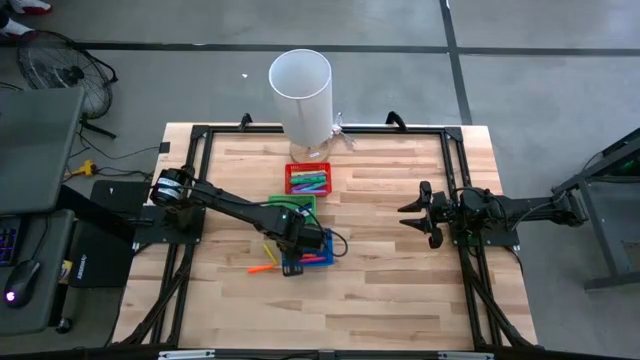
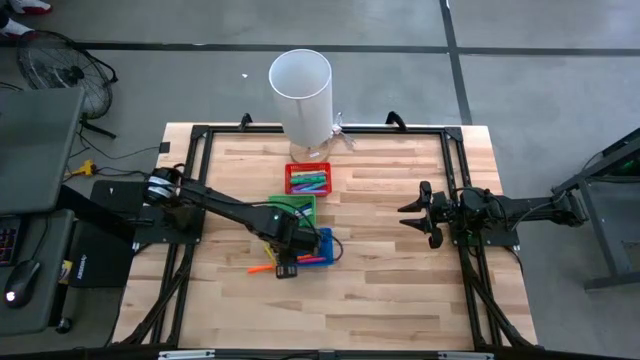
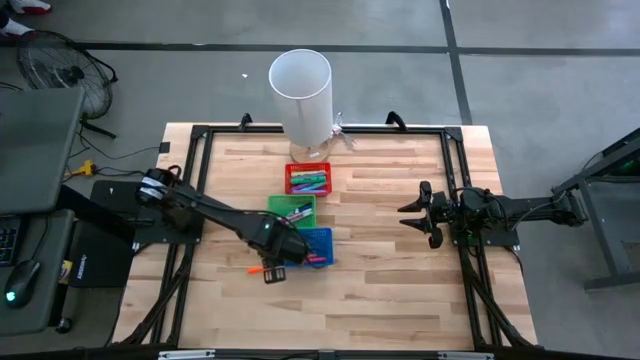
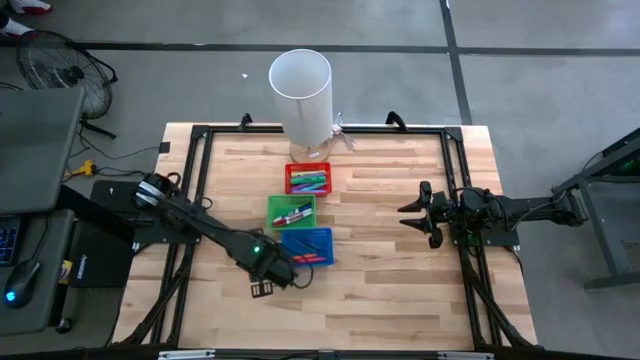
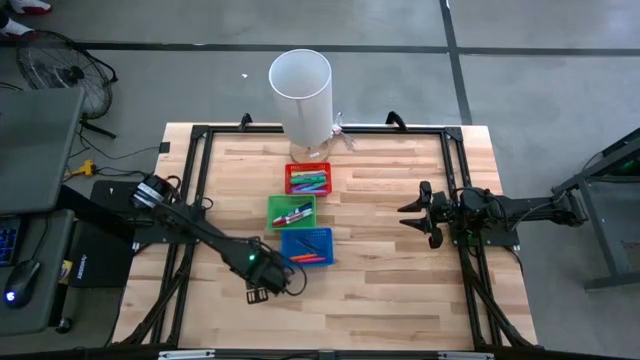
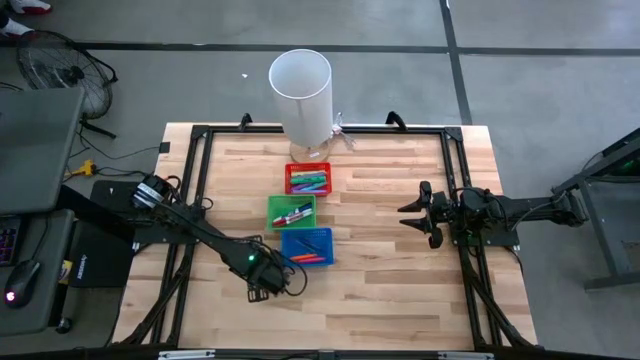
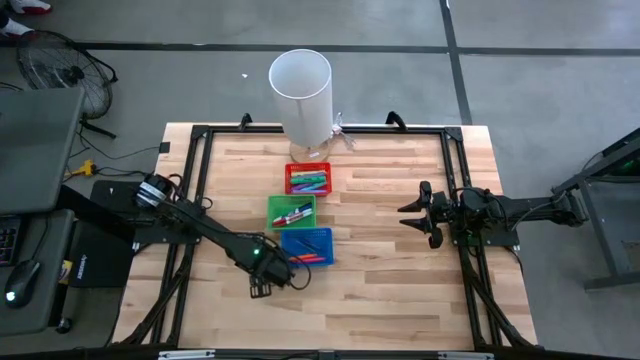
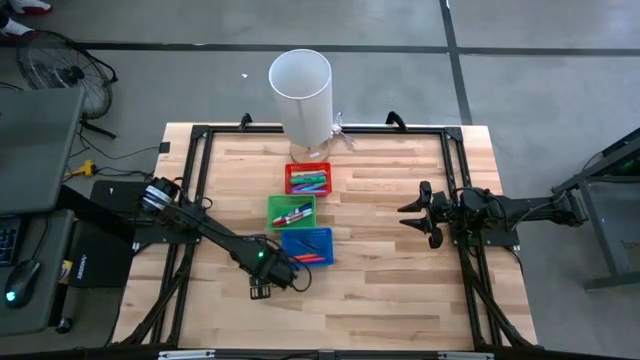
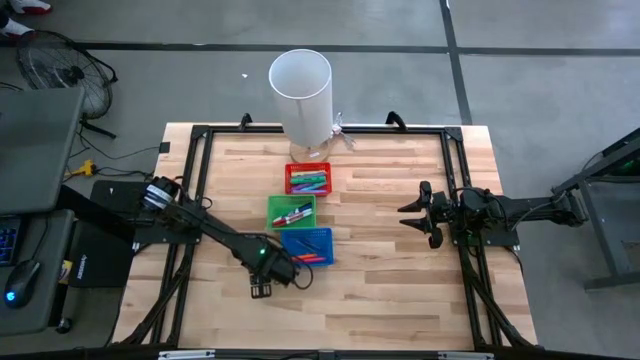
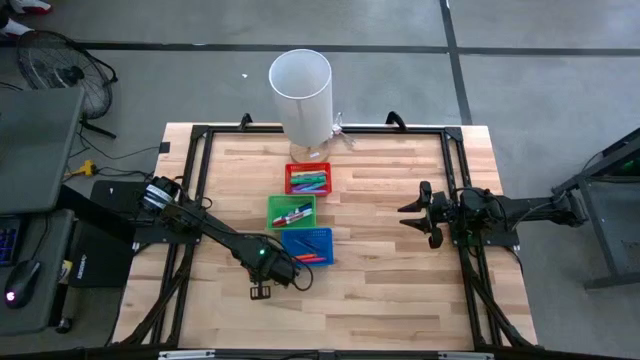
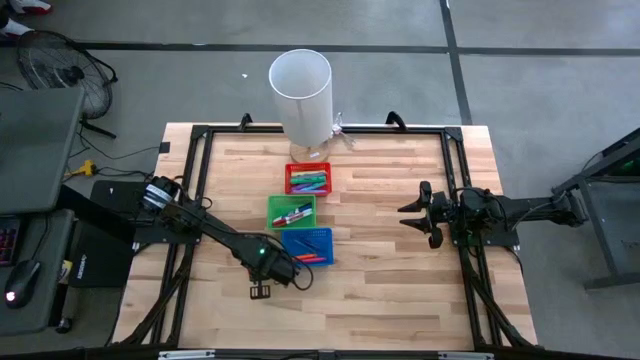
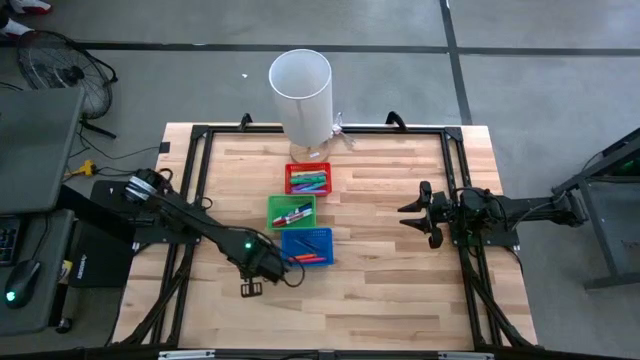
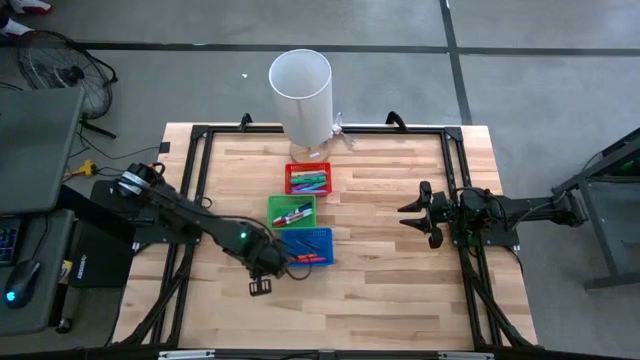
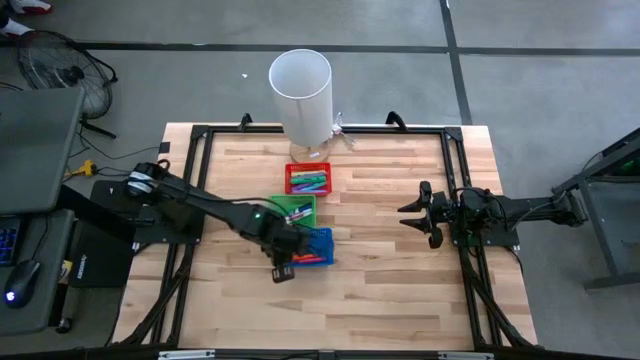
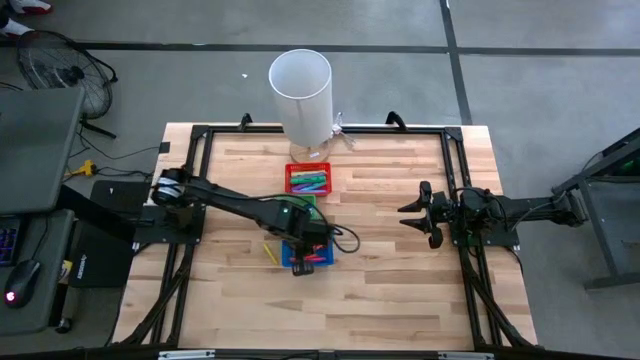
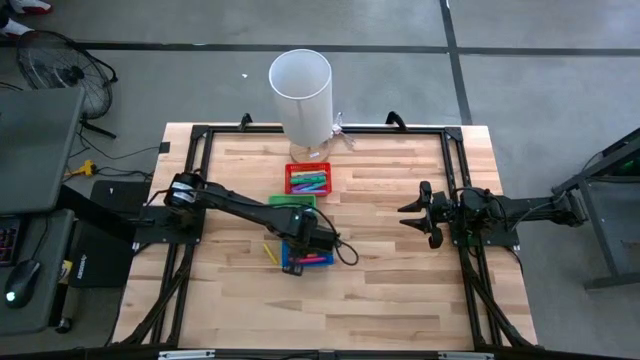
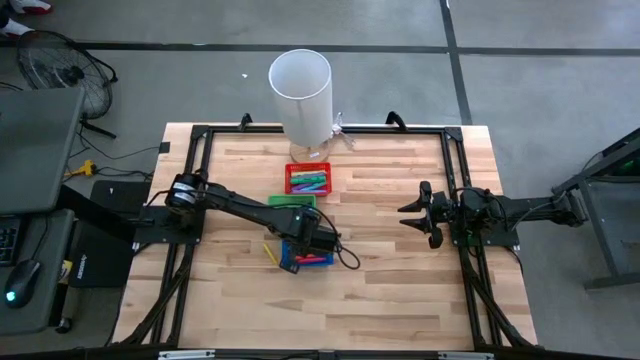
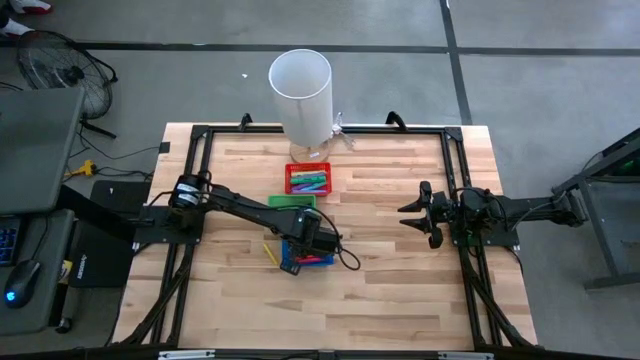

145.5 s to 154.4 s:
Task: Pick & Place Markers
Put the orange pen into the blue bin

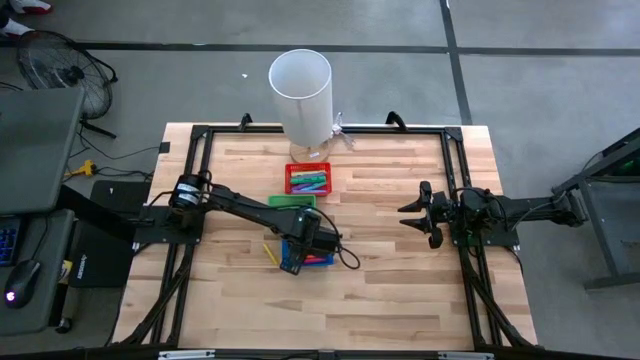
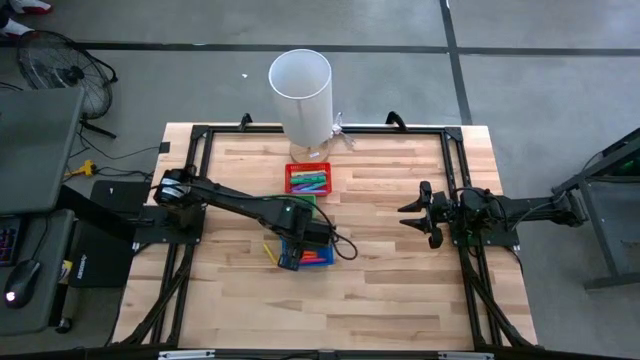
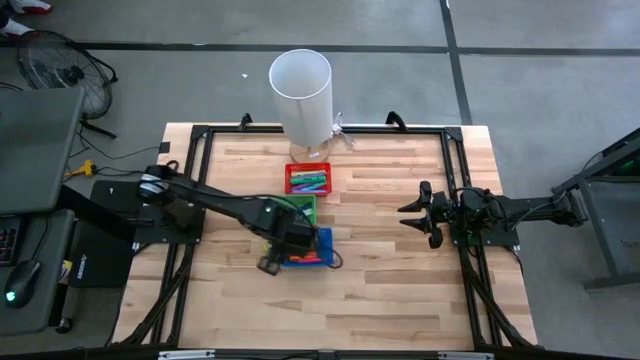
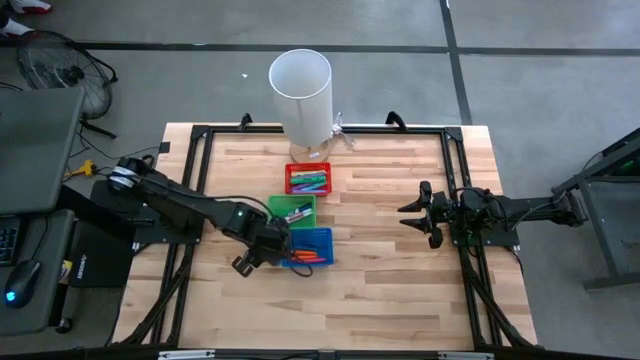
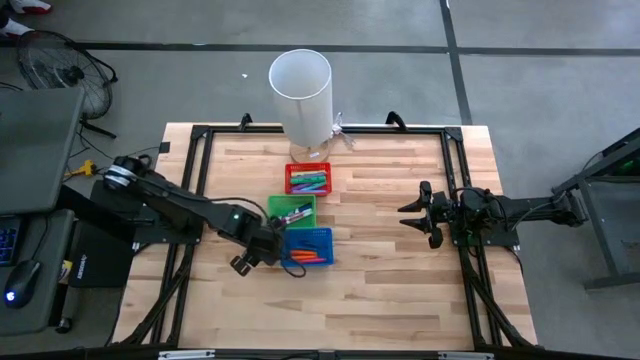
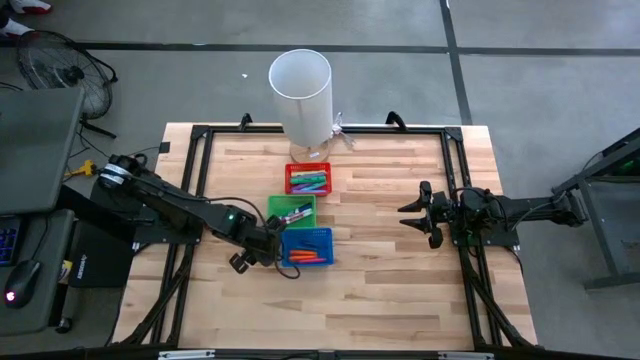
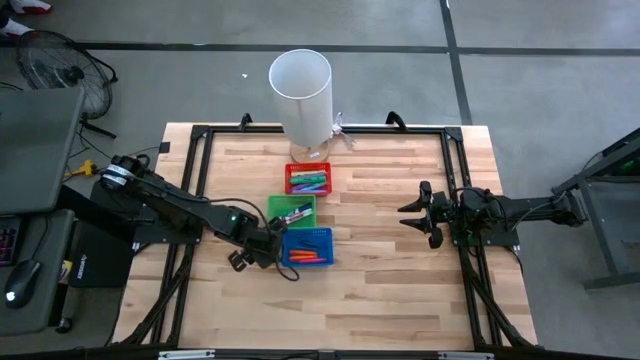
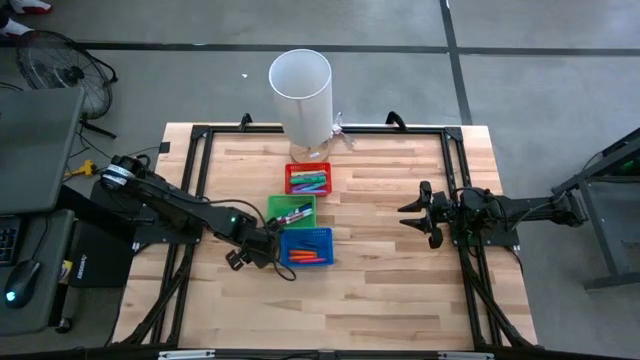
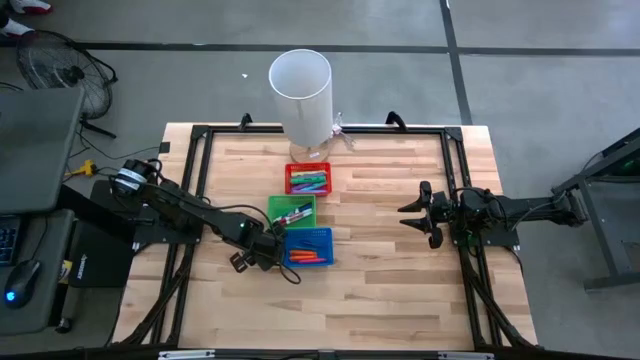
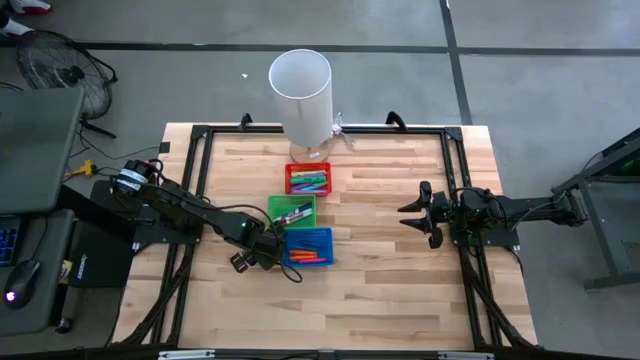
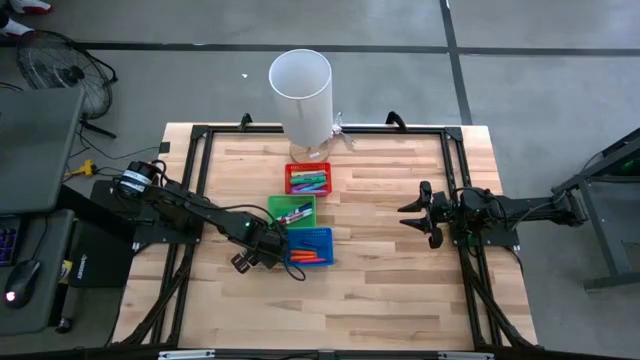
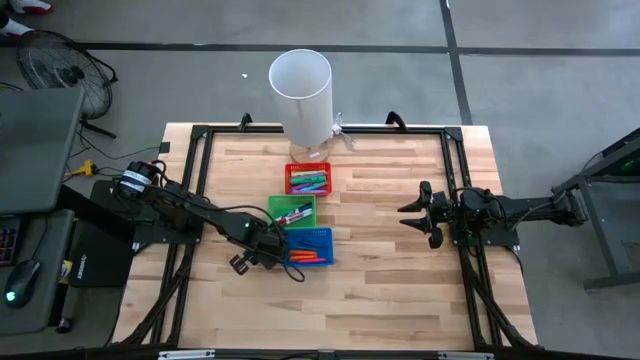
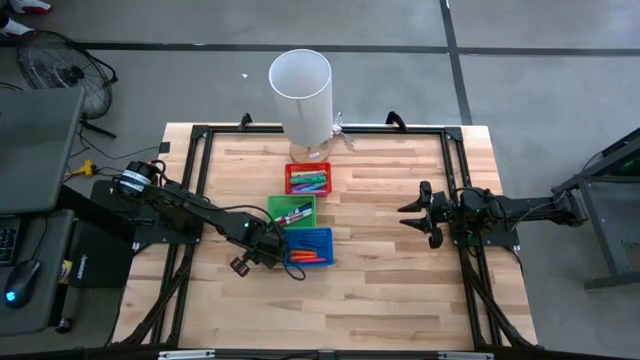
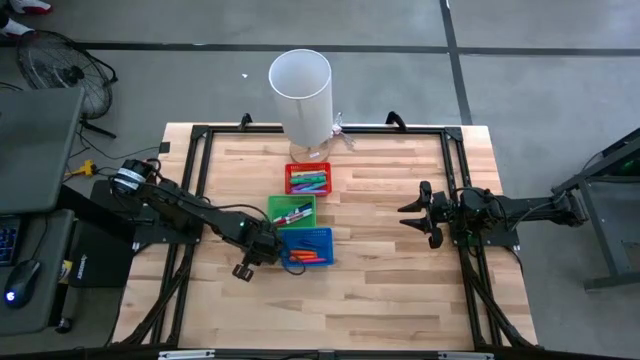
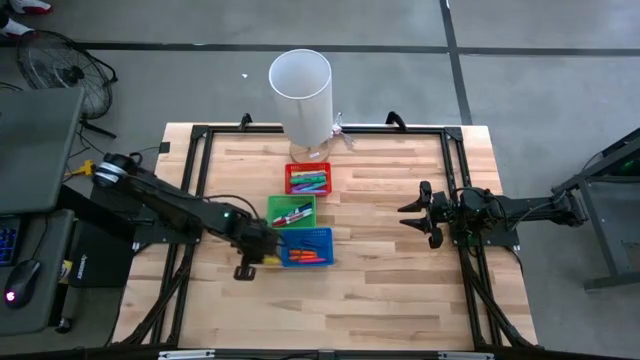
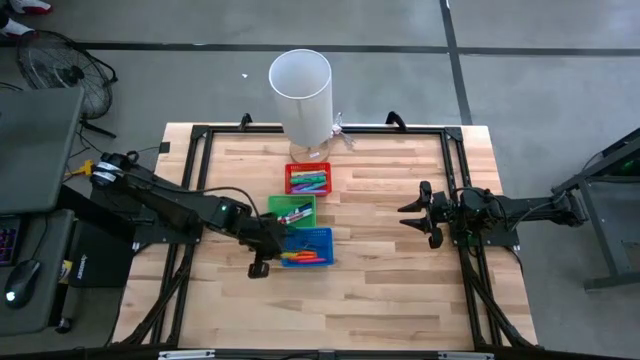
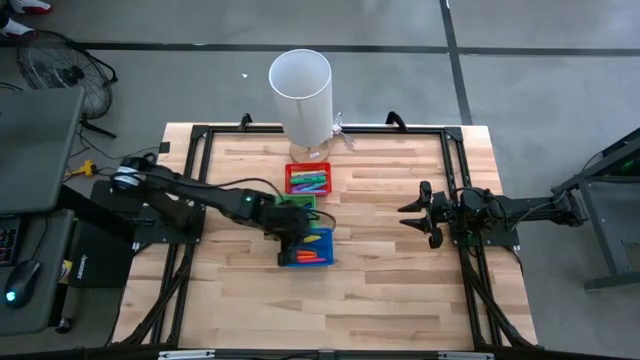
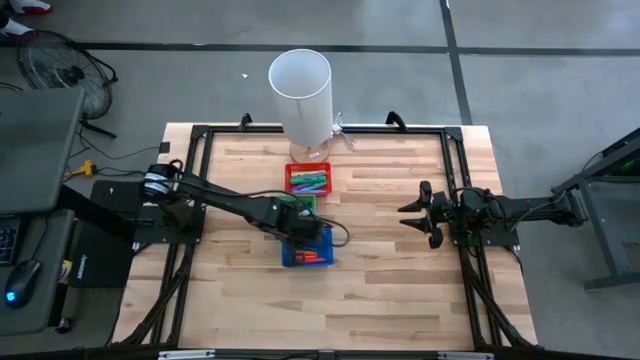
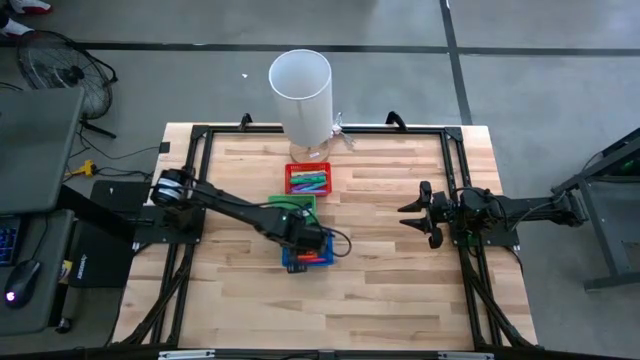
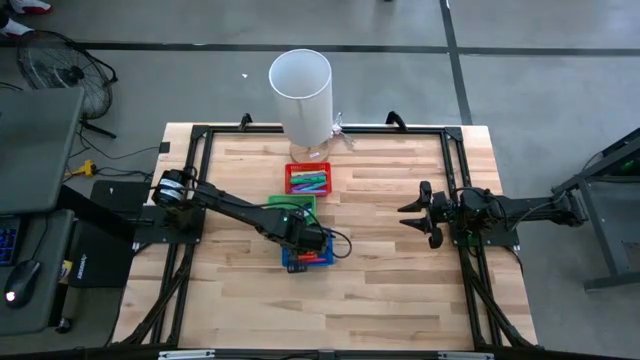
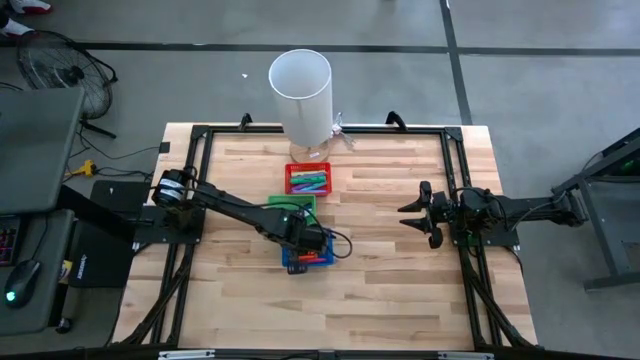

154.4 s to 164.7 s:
Put the yellow marker pen into the blue bin

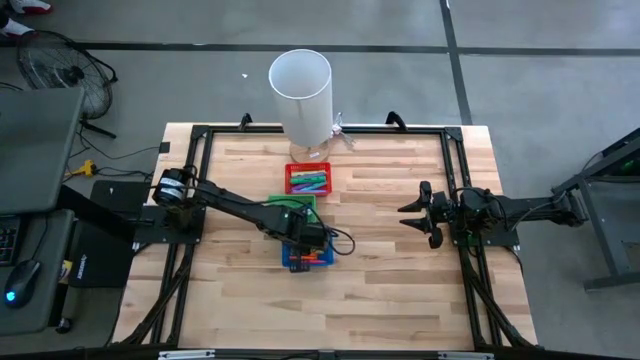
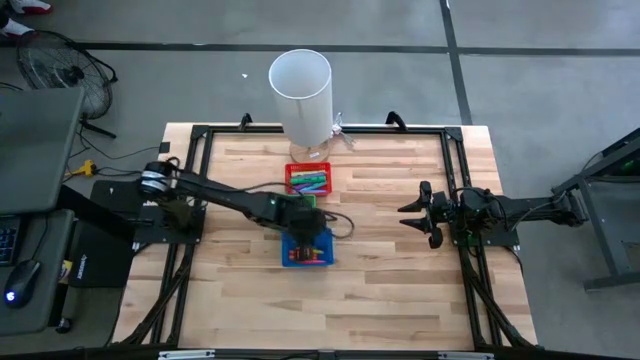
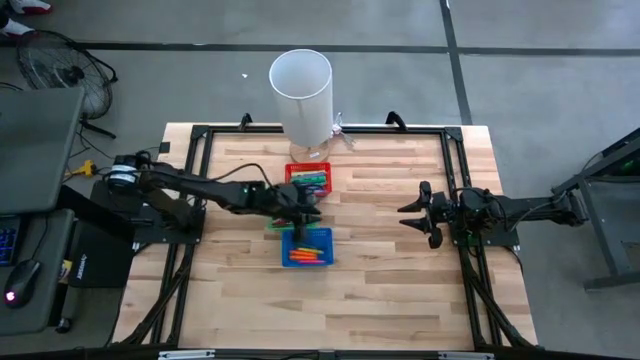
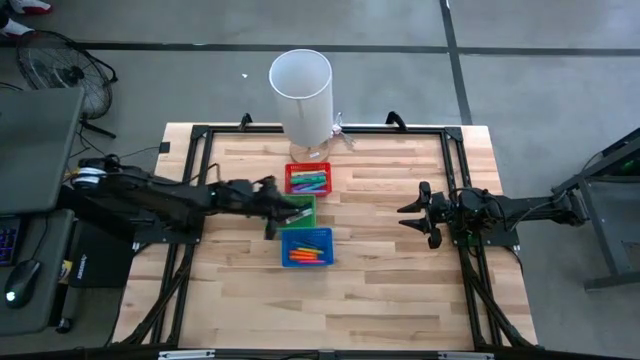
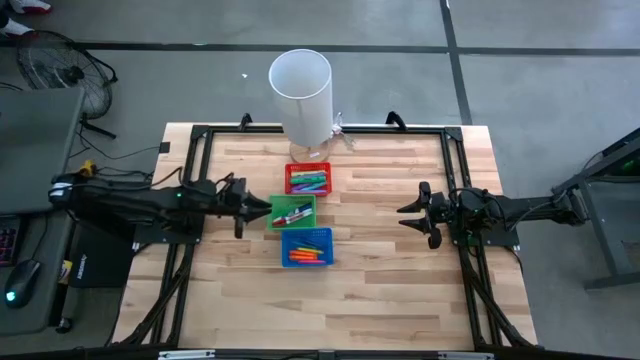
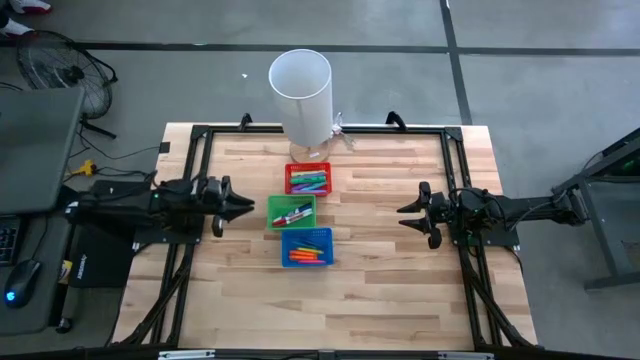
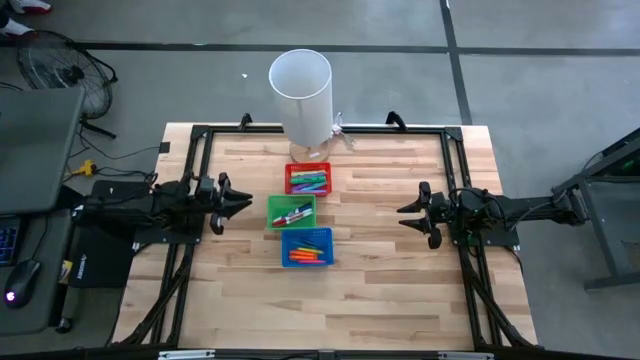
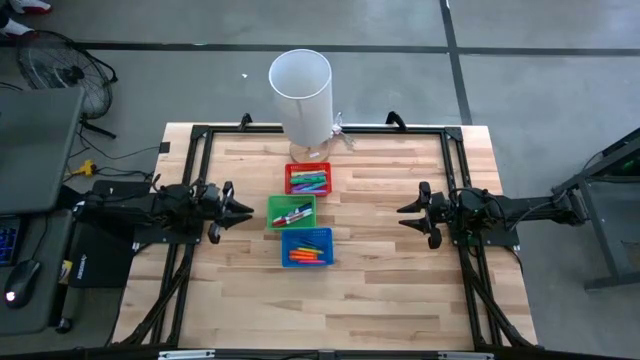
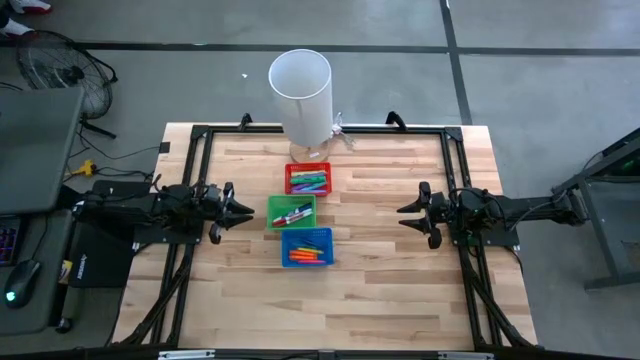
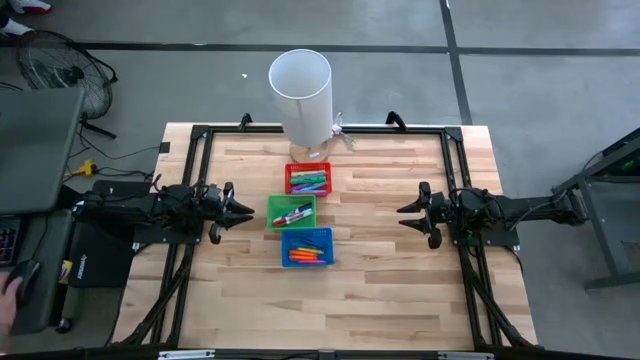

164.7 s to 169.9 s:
Return to Home Position
